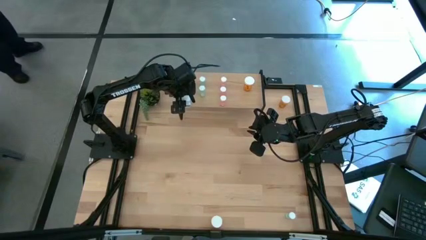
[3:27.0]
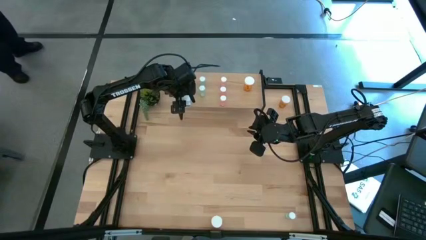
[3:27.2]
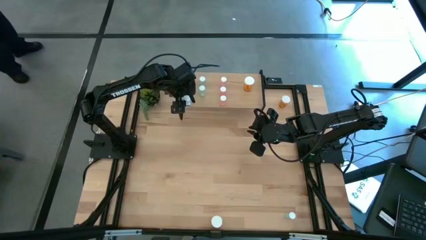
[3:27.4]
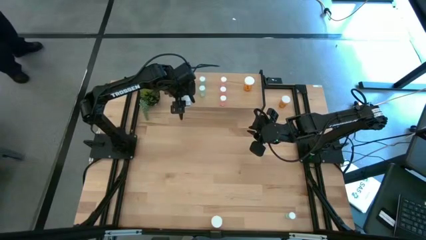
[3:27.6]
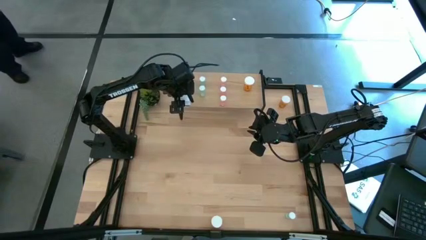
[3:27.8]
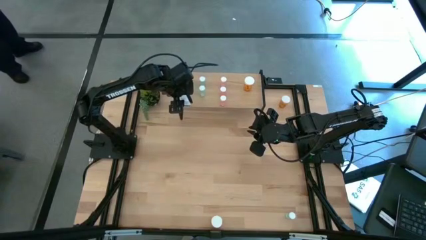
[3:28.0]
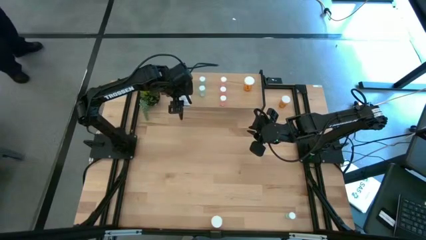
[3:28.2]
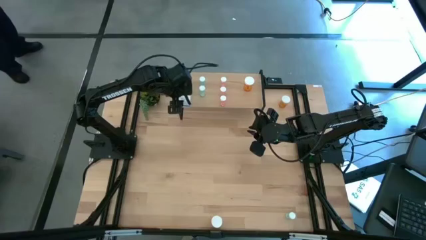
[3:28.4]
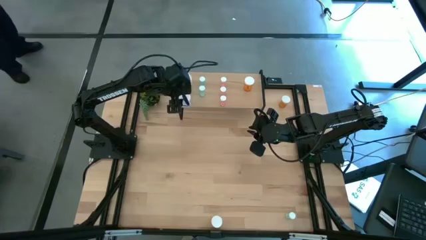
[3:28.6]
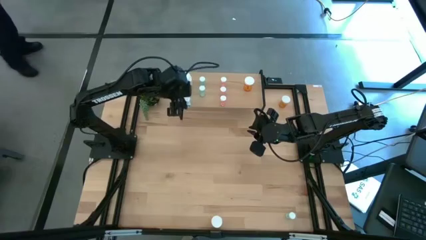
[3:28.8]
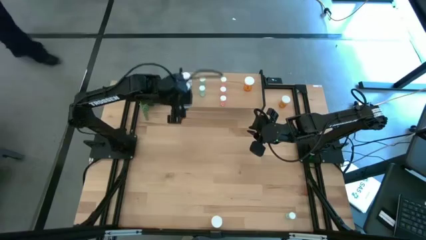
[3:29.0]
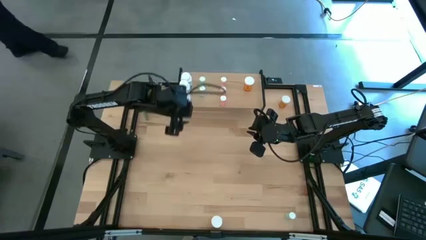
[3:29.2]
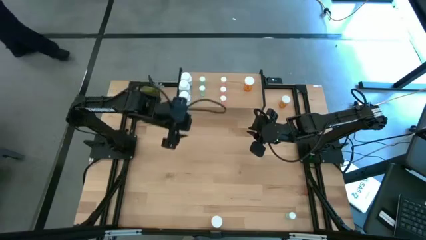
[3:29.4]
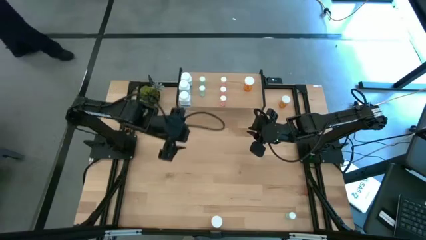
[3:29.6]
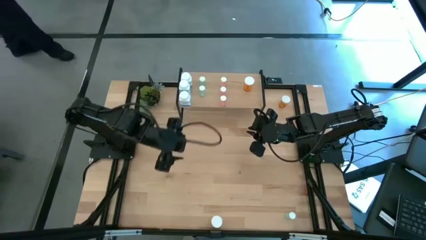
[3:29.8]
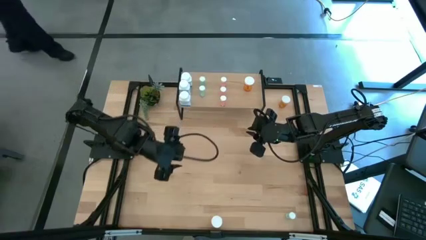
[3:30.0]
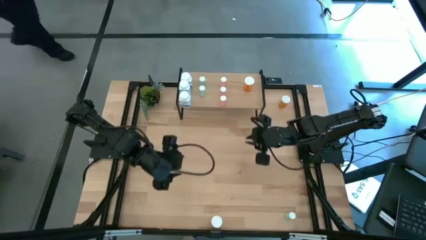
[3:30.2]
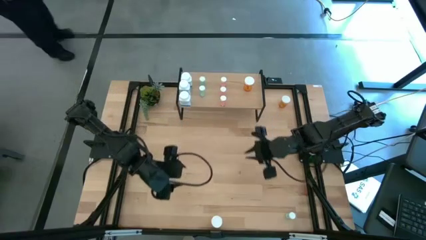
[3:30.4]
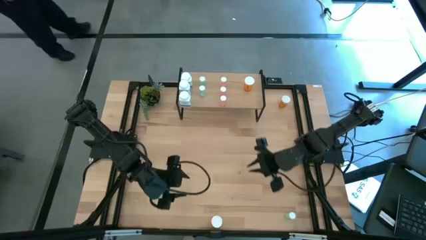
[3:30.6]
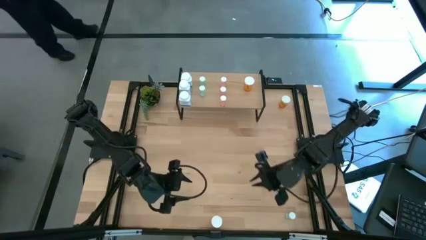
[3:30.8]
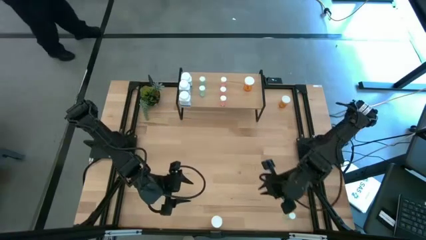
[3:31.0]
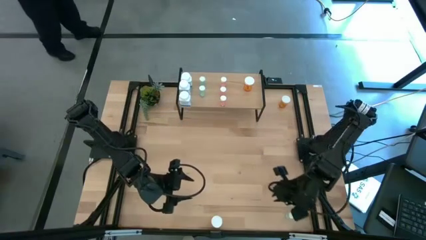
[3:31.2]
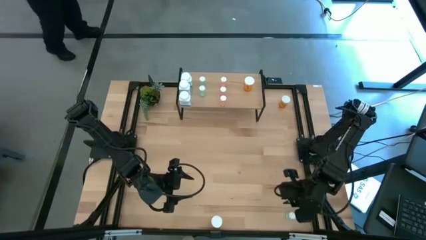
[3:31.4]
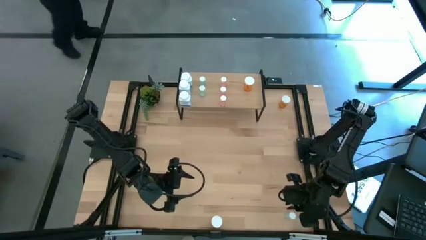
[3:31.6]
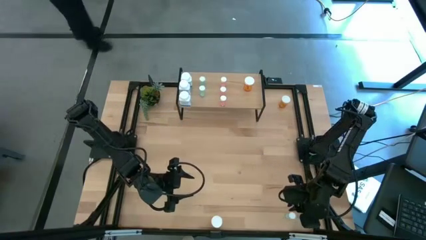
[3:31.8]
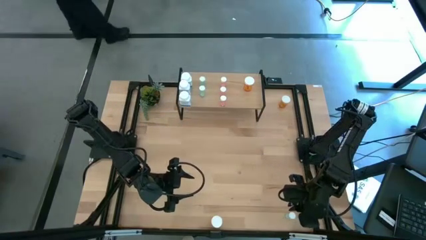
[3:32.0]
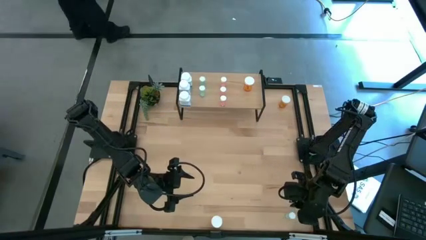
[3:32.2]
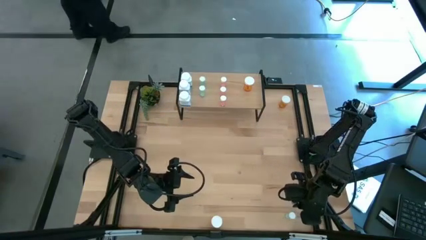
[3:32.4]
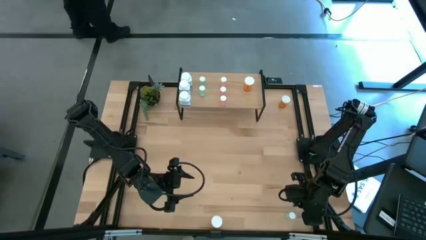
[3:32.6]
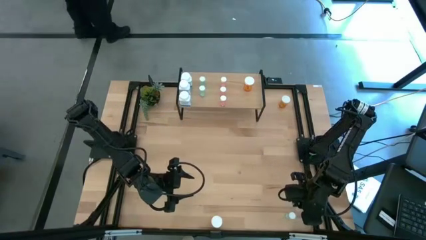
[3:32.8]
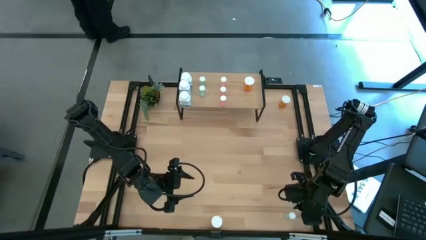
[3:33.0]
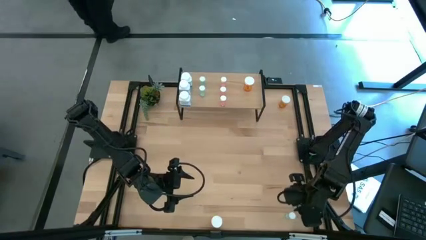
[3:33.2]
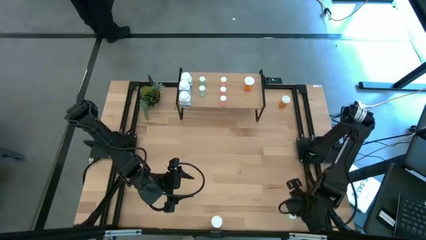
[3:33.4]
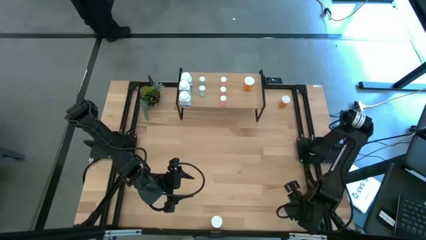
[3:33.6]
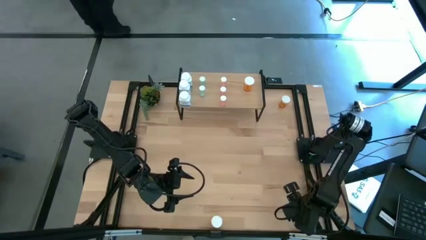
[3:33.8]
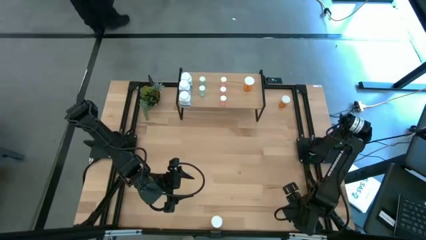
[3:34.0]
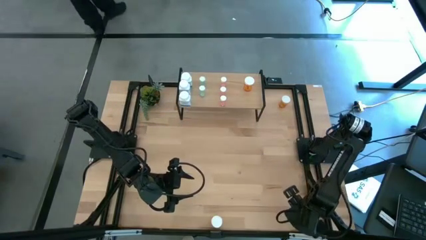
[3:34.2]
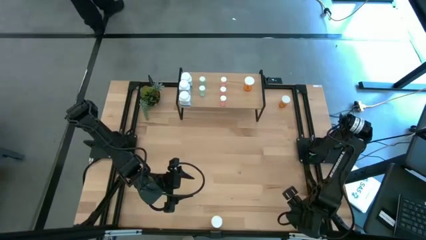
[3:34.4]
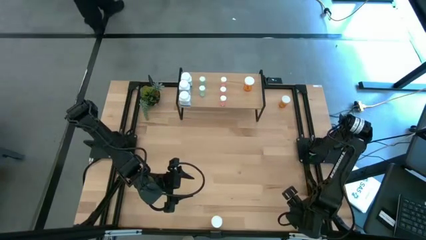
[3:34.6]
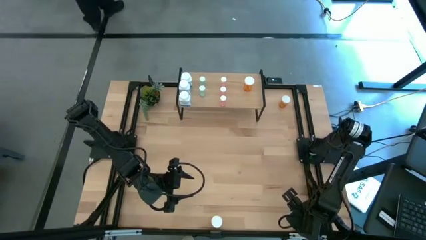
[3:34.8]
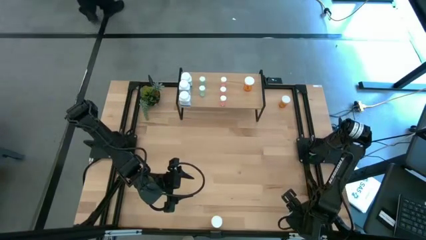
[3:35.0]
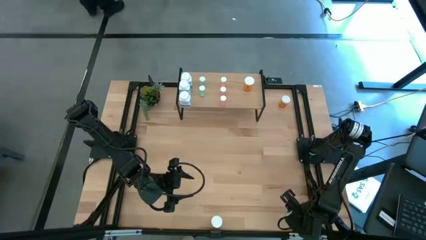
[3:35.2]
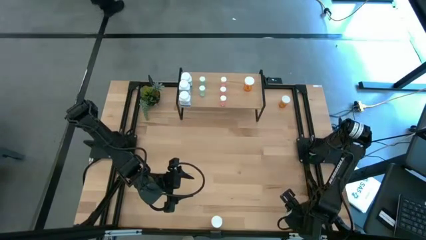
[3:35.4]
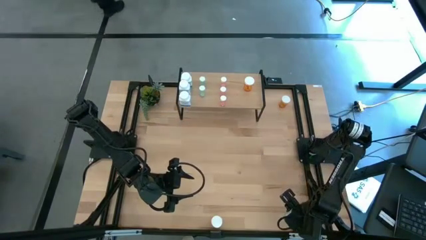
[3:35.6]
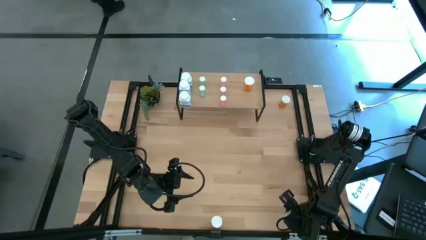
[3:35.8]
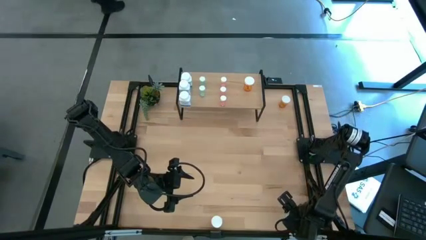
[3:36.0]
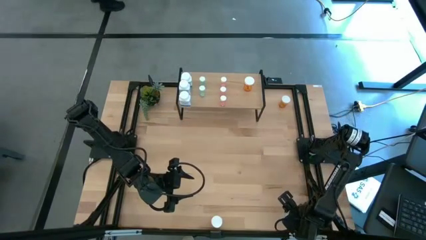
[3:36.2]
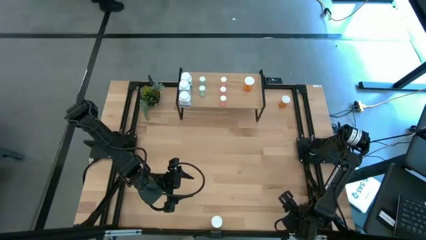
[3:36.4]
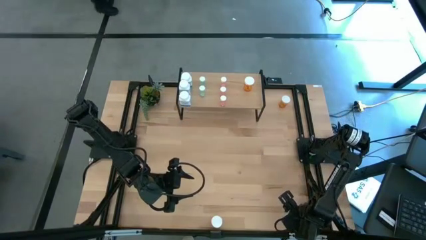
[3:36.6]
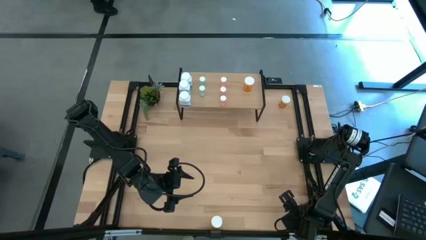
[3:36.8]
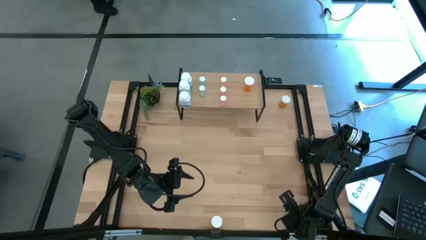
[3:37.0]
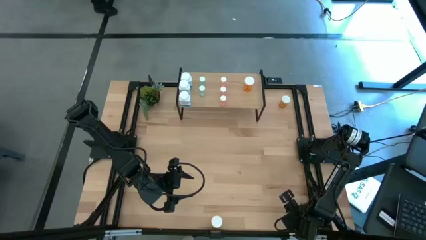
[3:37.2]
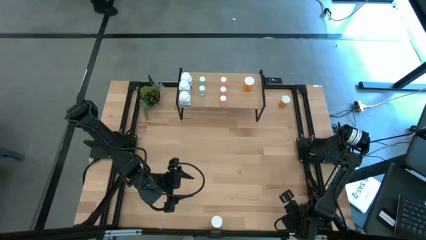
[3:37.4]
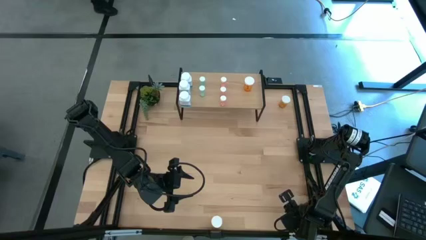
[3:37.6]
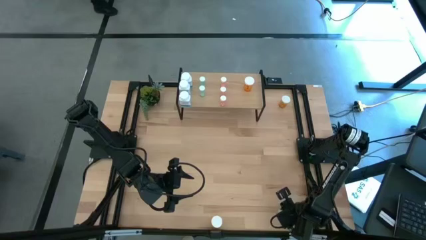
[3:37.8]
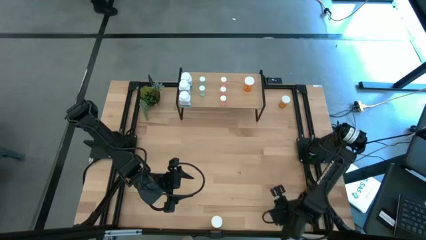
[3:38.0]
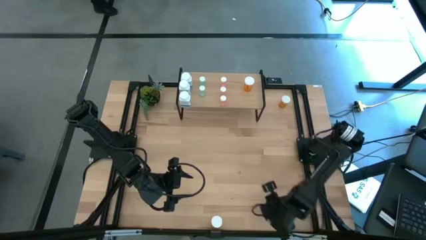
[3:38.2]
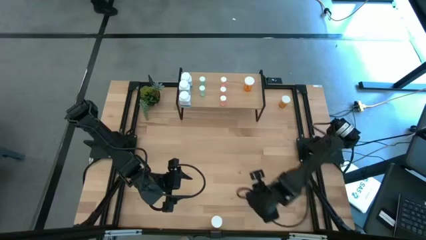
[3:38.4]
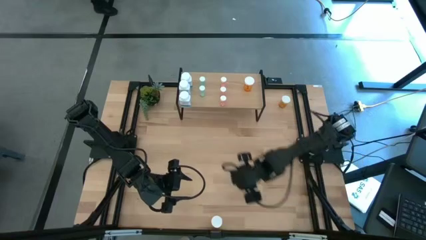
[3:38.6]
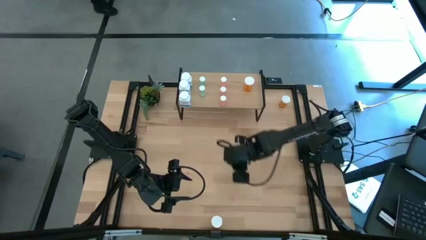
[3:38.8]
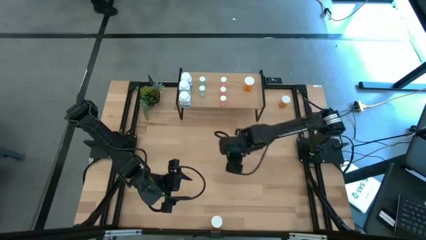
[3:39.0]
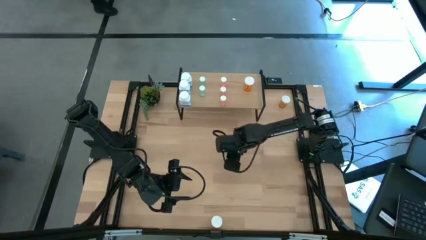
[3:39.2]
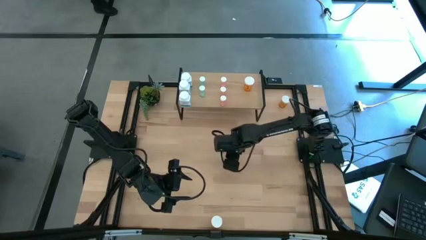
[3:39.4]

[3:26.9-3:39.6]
Task: Pick and place medicine bottles onto shelf by color
Put the blue pill bottle on the shelf aligned with the other blue pill bottles

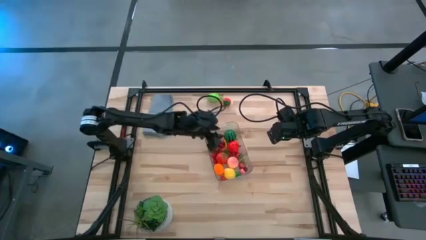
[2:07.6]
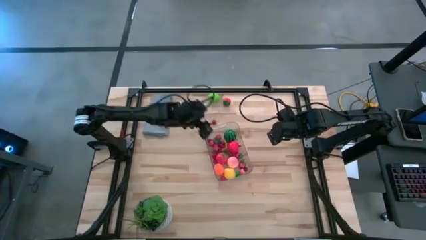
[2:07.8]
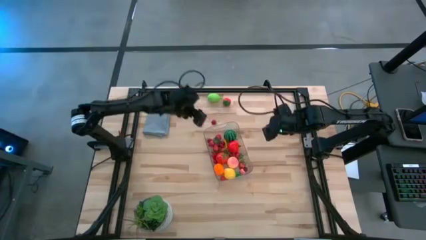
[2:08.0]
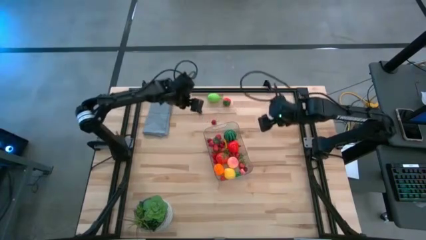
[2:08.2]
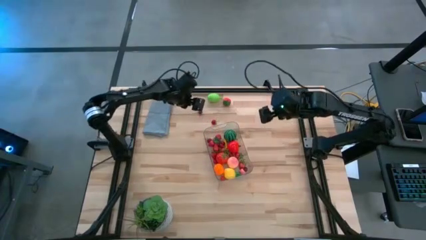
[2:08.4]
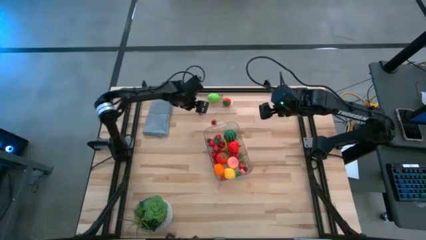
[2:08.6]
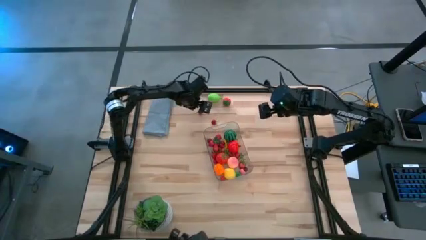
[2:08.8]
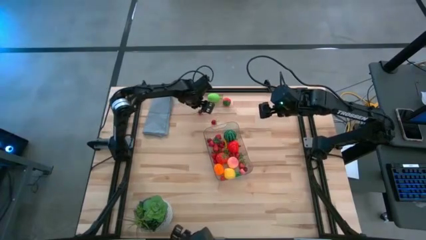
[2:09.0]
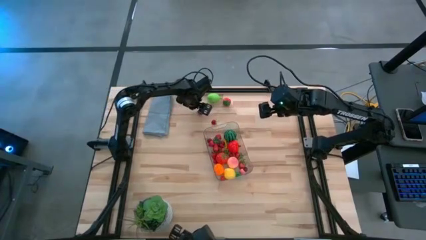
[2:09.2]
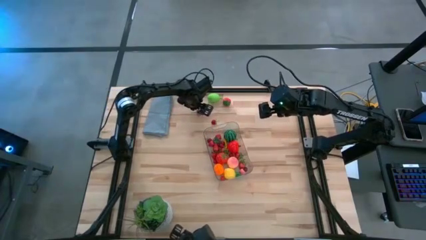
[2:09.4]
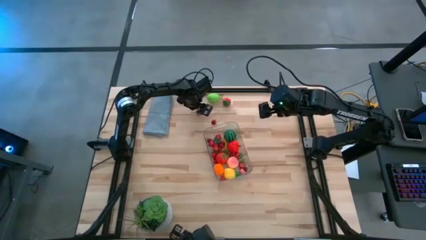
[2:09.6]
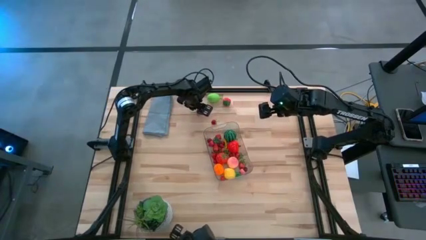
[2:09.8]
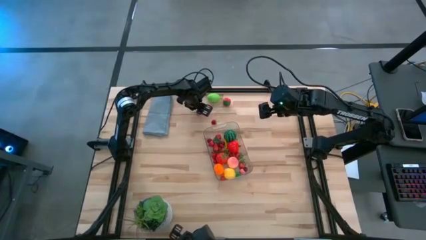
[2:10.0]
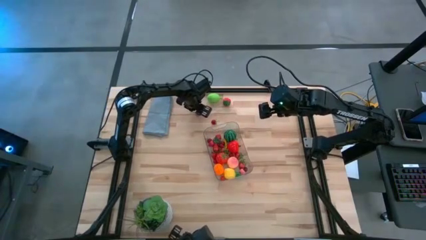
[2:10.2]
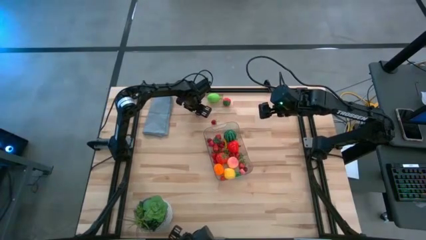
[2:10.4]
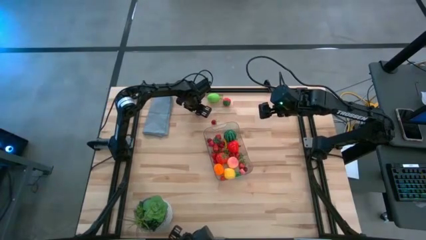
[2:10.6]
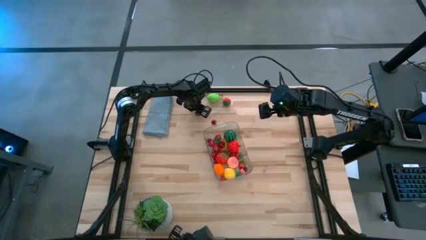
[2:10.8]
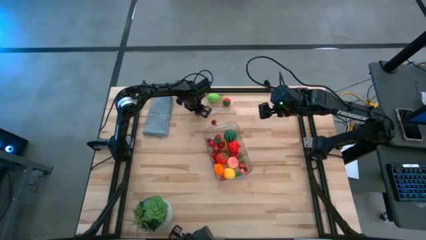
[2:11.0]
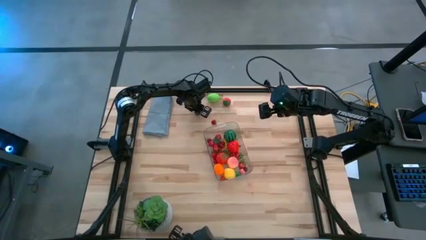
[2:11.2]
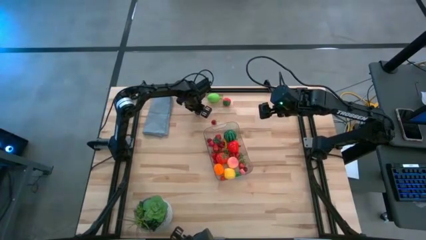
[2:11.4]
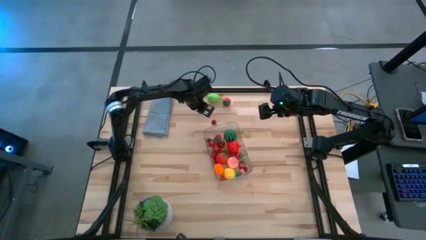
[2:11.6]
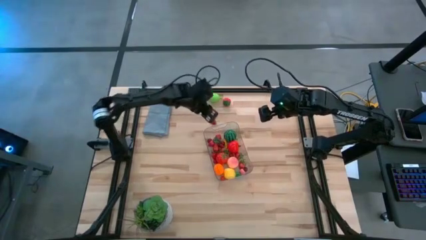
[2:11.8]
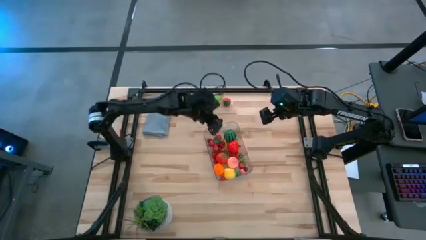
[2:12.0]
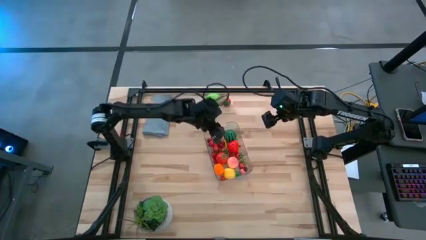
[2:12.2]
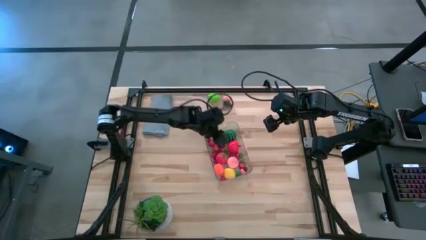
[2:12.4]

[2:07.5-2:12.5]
Task: Pick and placing Produce into tupperware
Put the red cherry into the transparent bin
